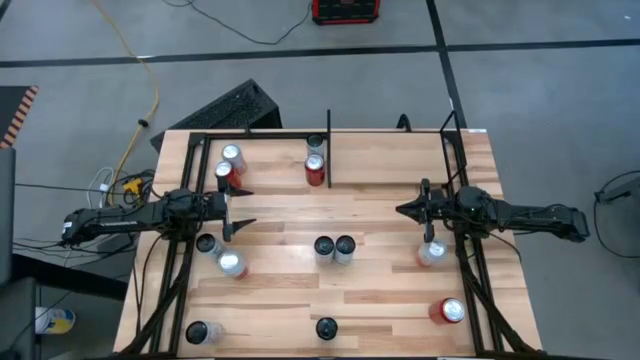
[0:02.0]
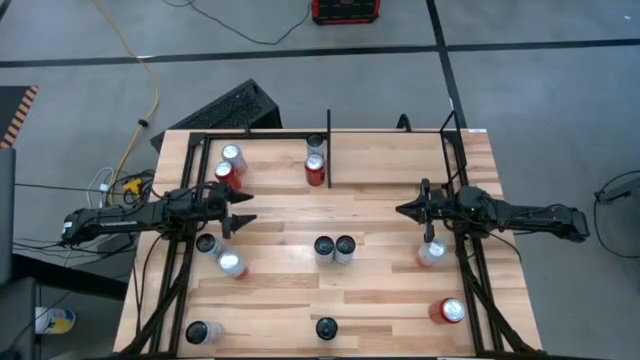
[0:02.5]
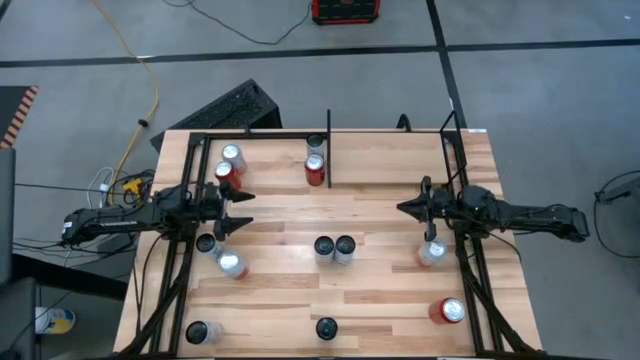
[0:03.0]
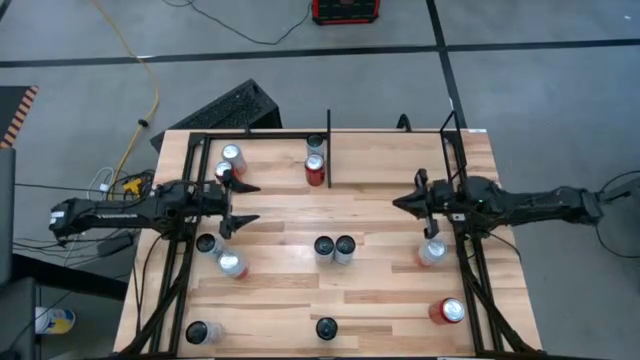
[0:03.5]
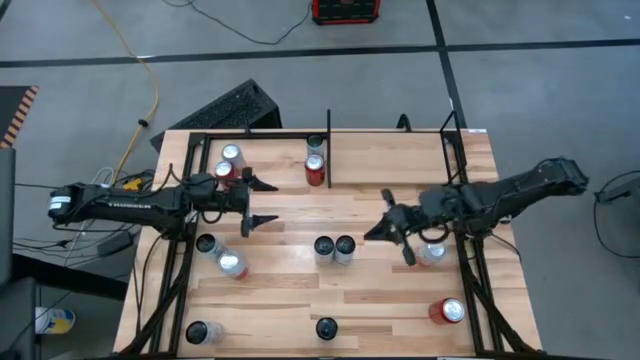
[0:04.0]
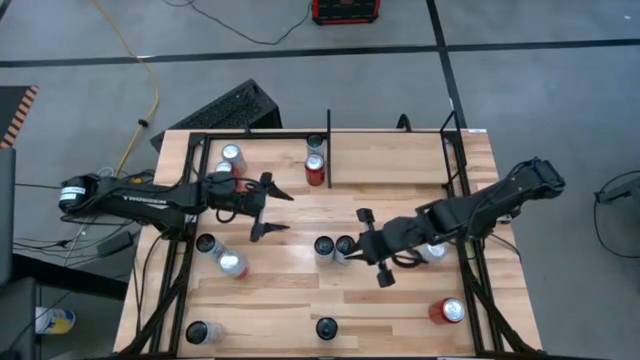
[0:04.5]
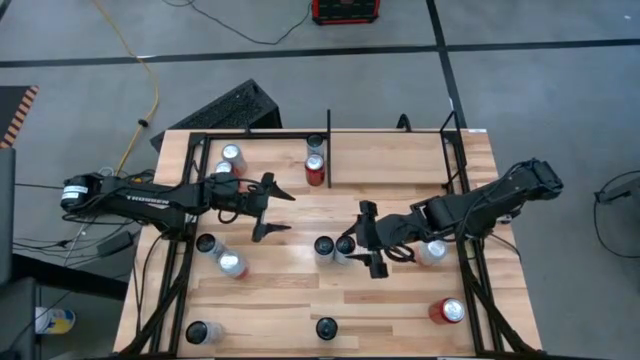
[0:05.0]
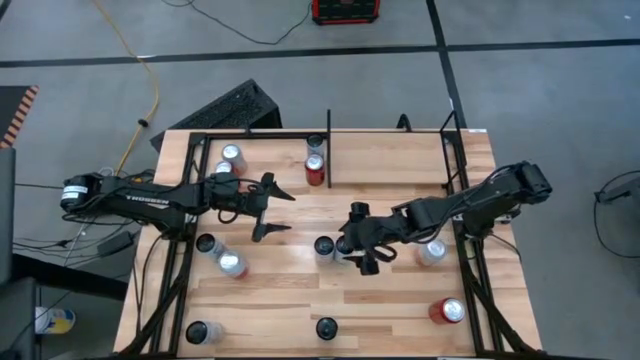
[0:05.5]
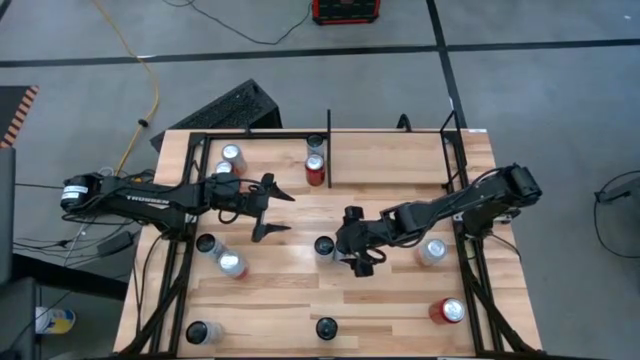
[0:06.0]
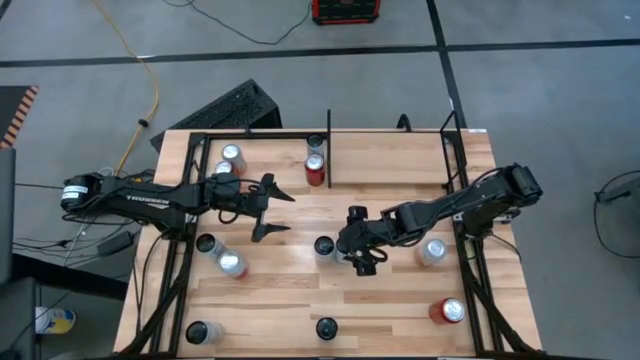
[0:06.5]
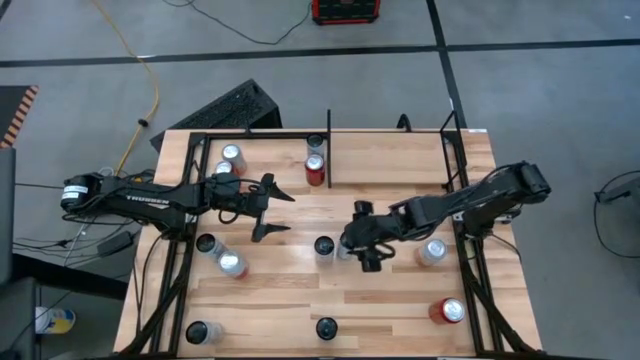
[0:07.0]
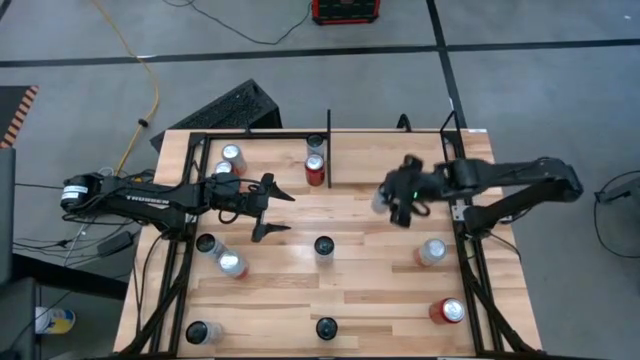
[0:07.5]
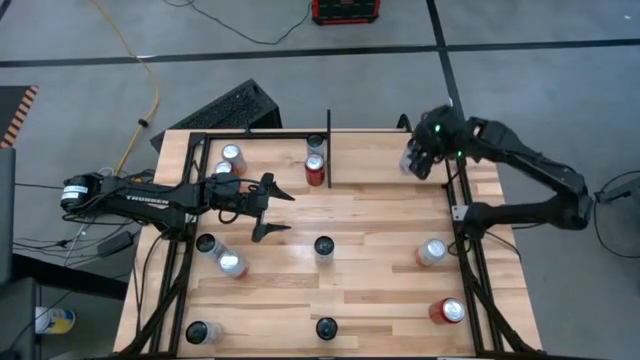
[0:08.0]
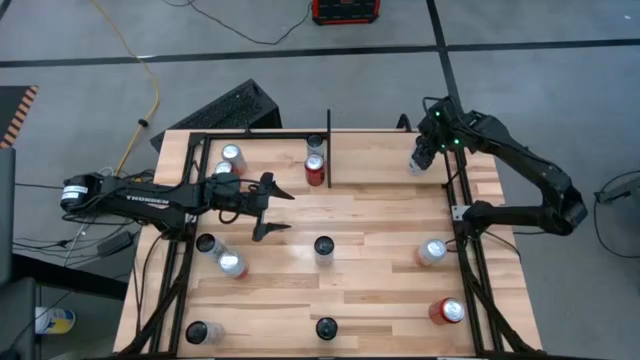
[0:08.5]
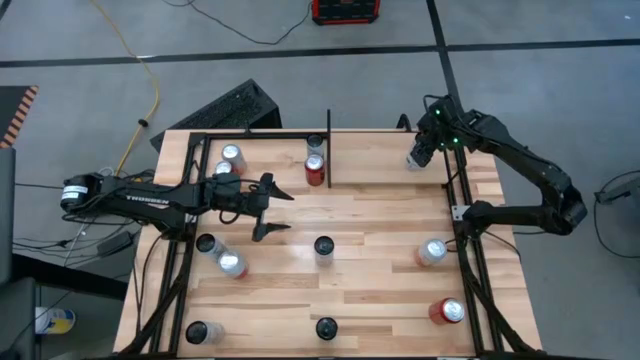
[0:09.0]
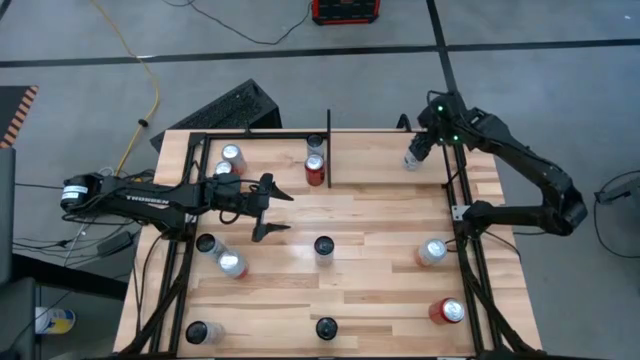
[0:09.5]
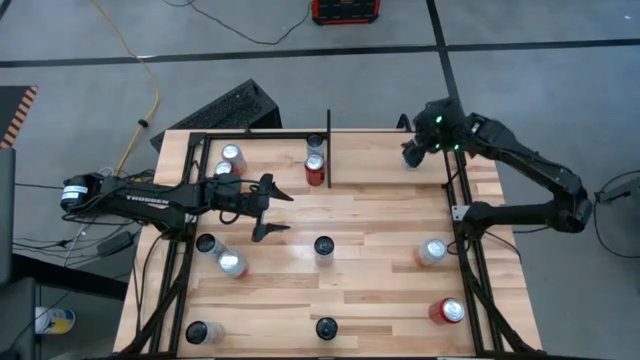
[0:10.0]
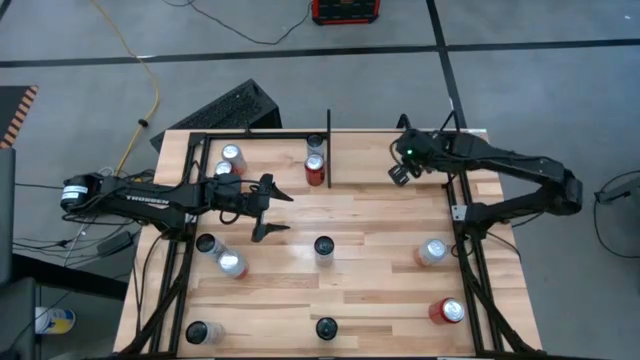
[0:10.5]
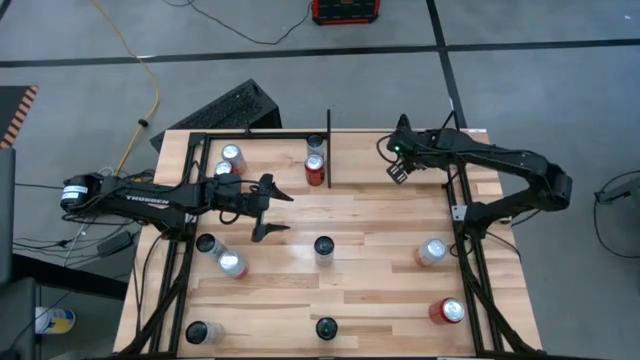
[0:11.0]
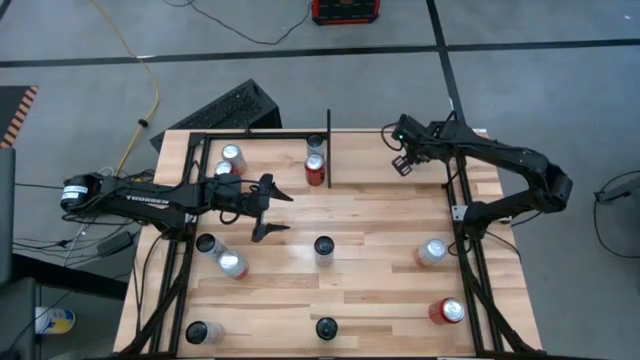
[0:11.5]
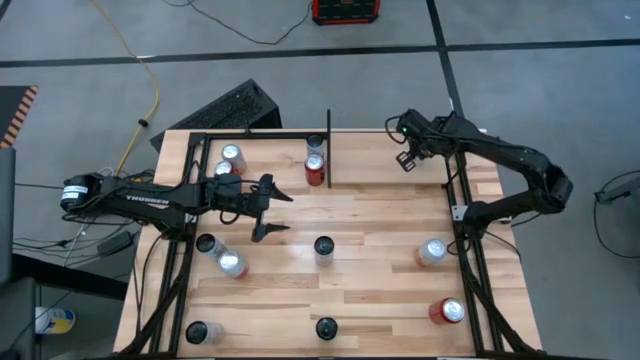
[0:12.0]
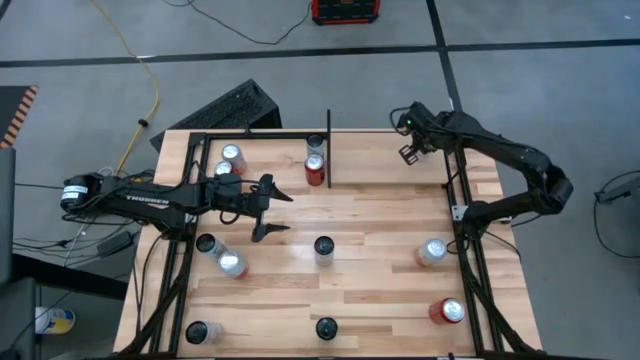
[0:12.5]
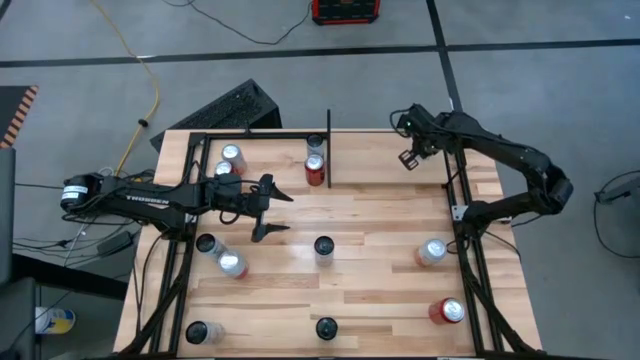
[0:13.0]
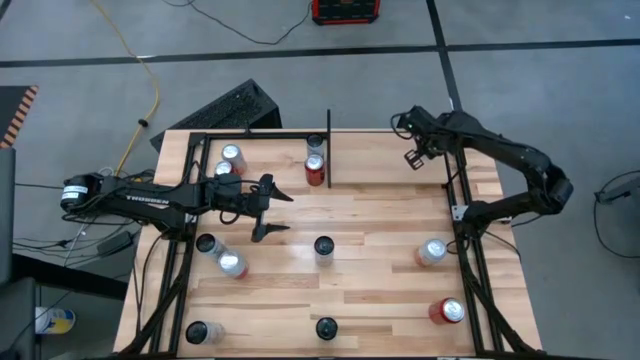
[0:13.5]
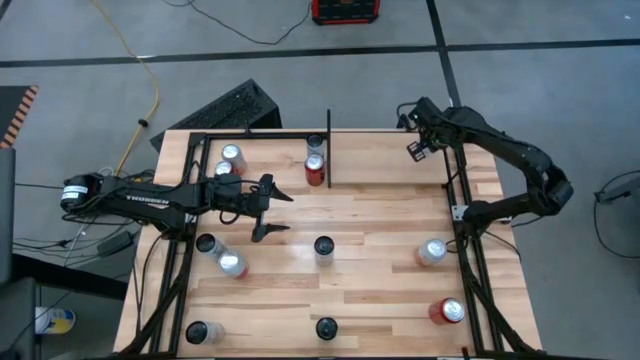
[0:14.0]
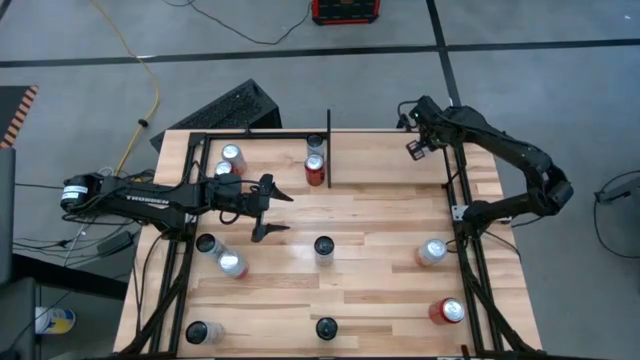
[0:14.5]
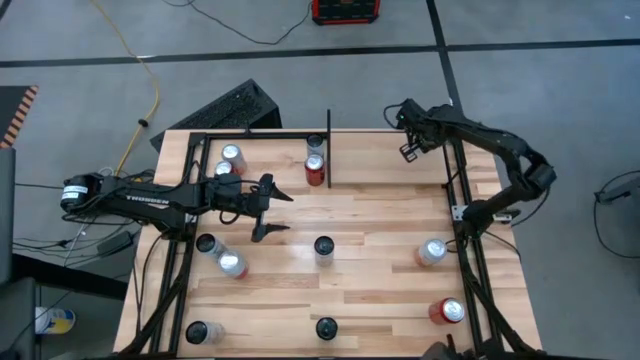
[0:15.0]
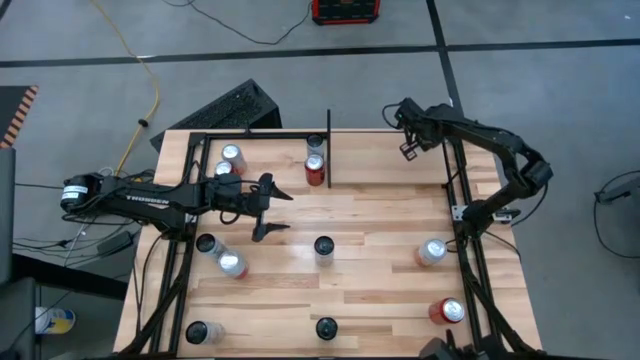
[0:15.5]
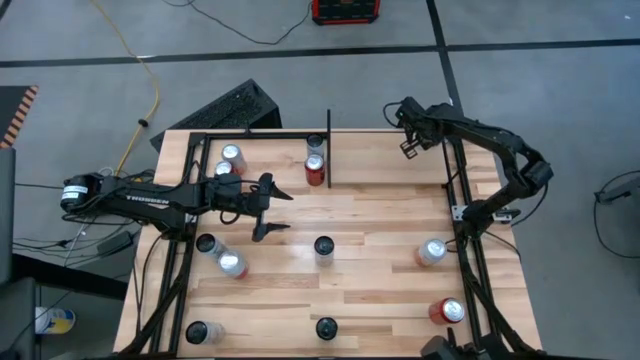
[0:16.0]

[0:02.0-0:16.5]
Task: Place canned beverage on shelf
Put the black blue soda can on the shelf

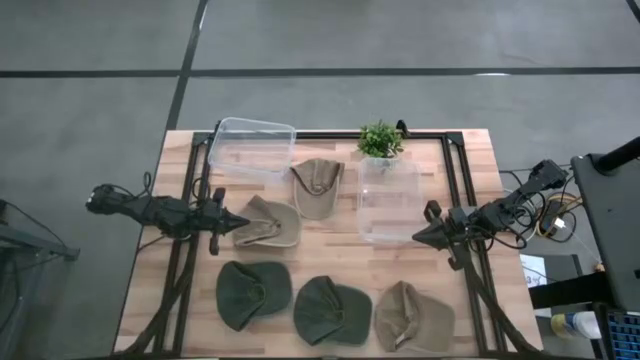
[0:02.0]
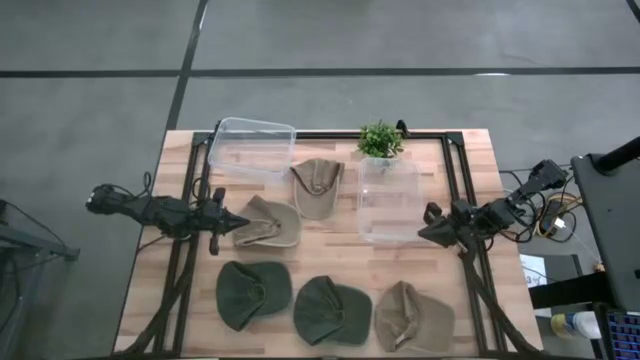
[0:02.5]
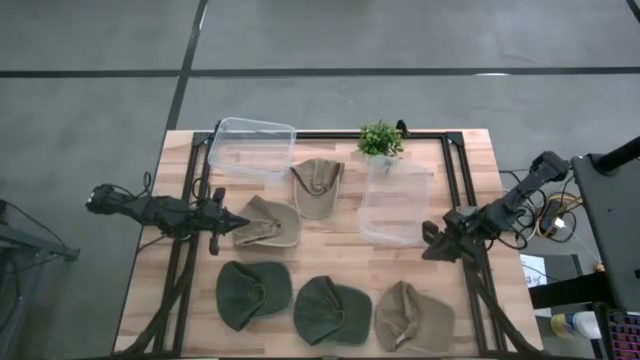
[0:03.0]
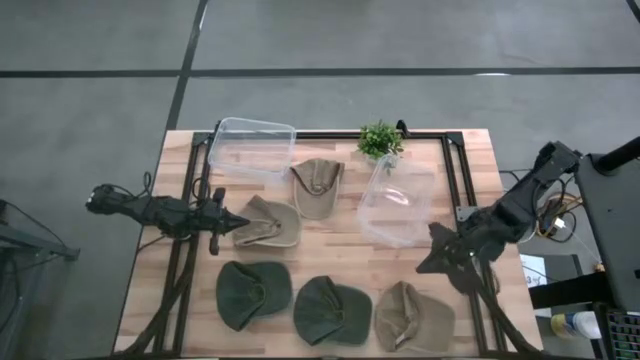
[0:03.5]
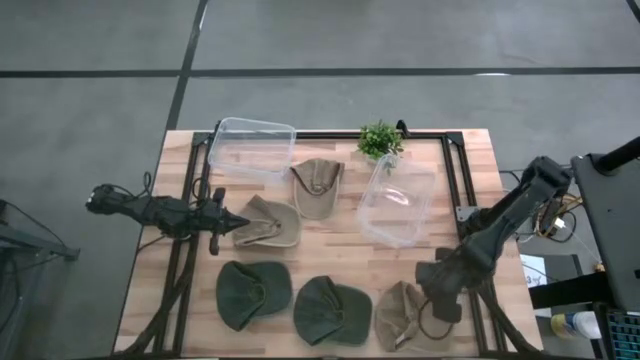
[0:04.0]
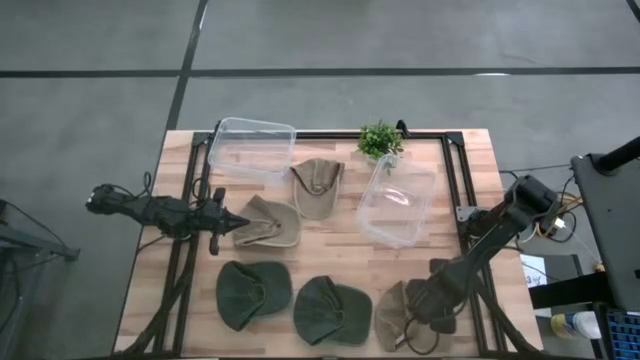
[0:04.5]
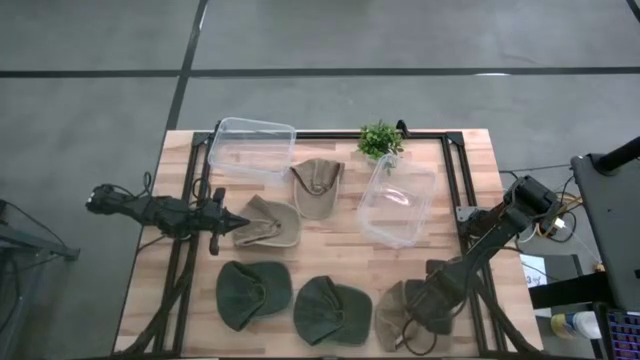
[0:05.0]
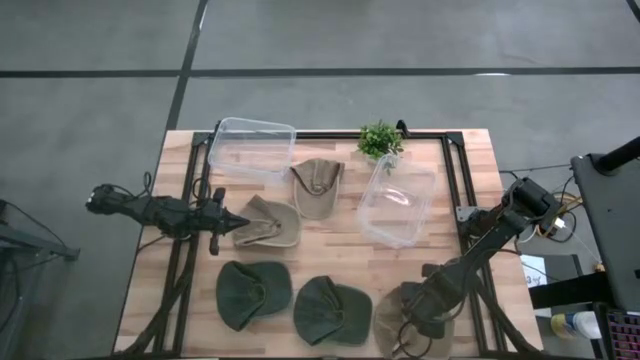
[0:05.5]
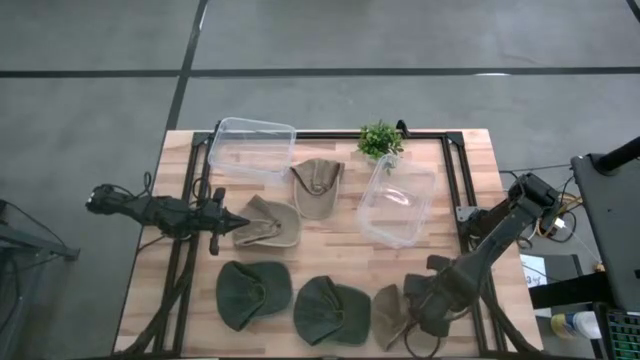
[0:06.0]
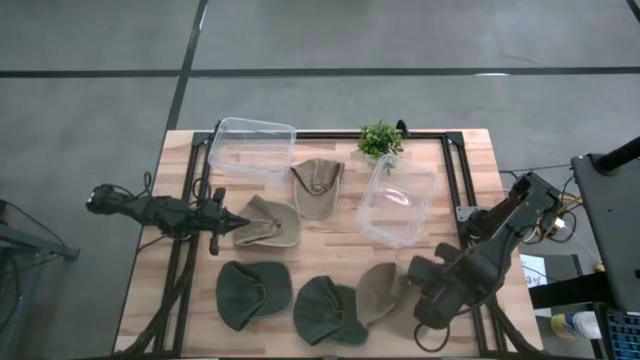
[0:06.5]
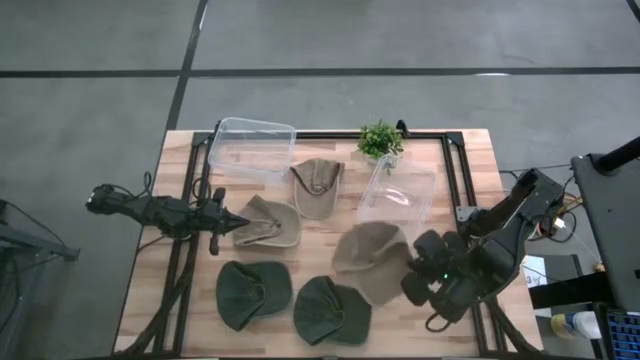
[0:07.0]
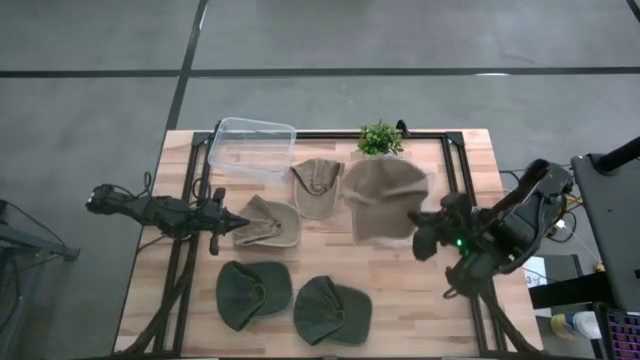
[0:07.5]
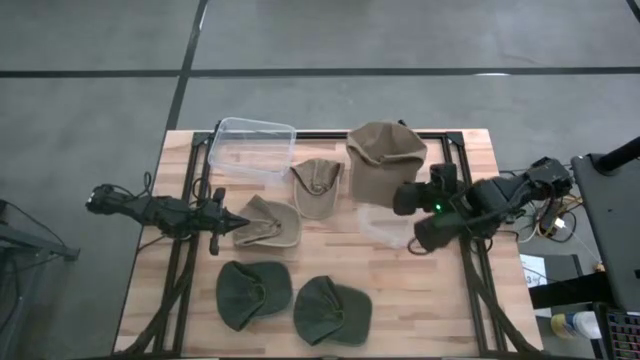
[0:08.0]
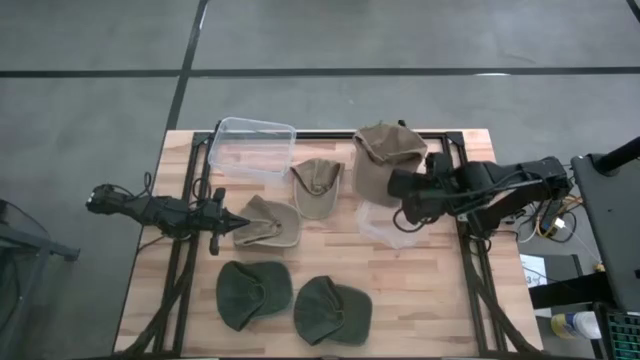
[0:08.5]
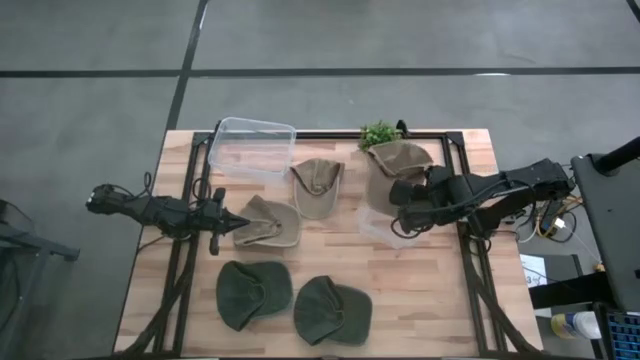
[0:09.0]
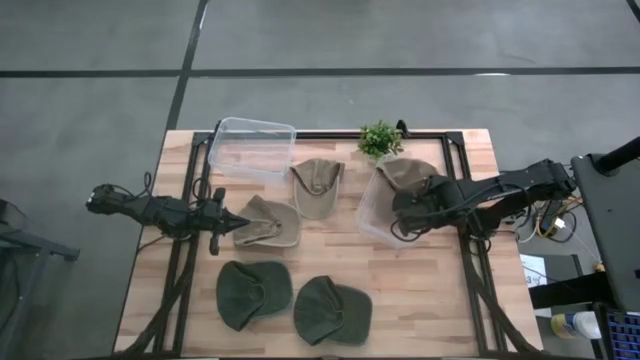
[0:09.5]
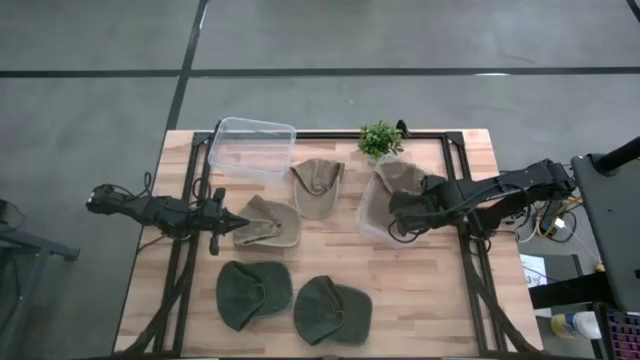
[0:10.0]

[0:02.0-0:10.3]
Task: Pick & Place hat
Put the bottom brown cap into the right transparent bin
